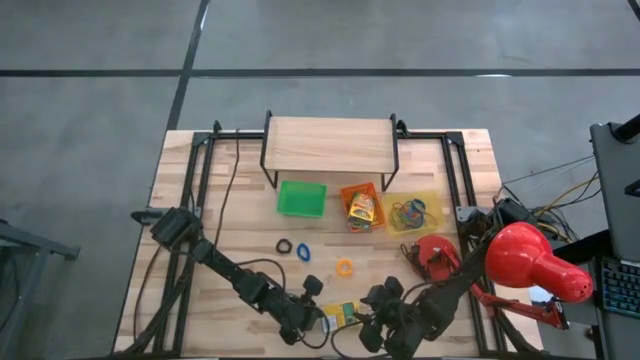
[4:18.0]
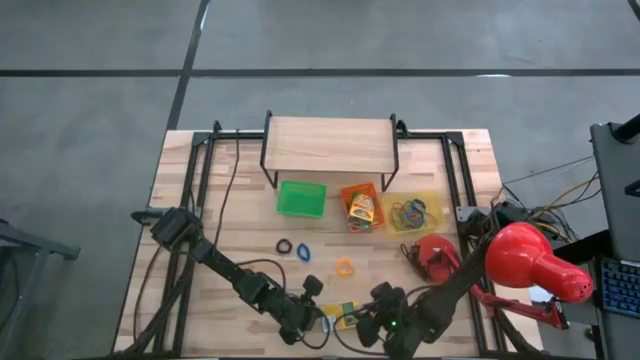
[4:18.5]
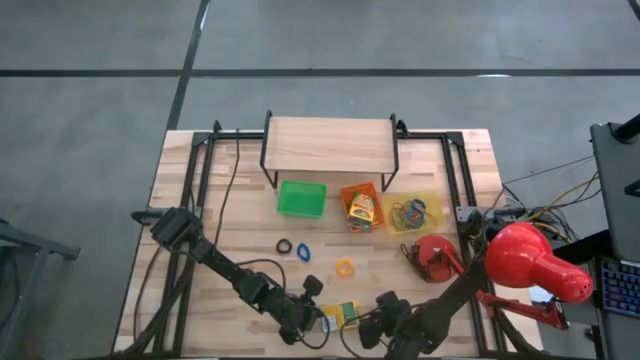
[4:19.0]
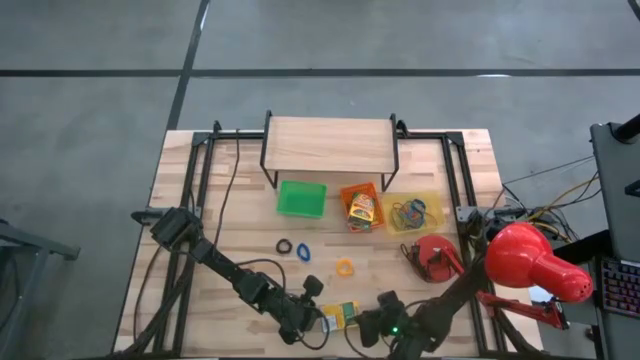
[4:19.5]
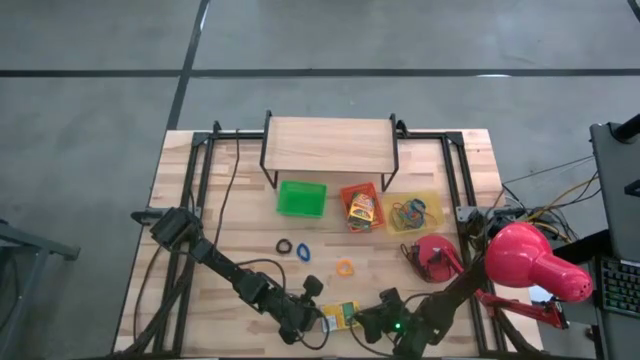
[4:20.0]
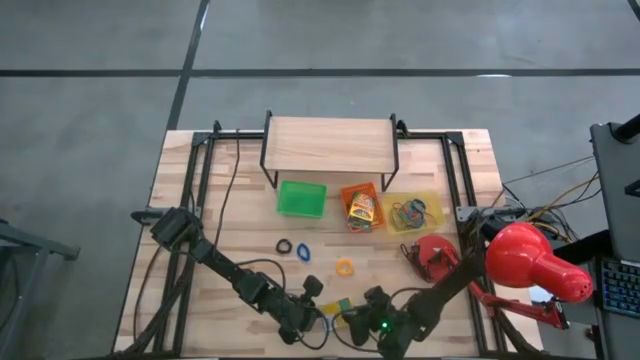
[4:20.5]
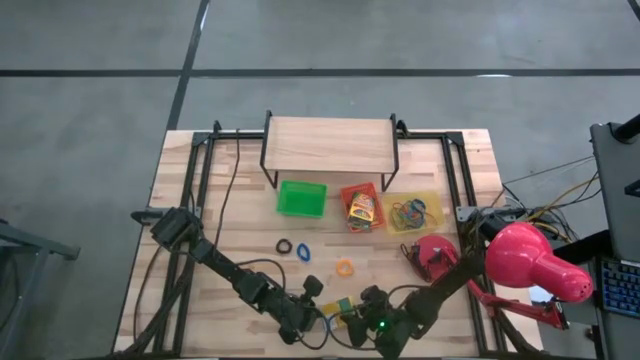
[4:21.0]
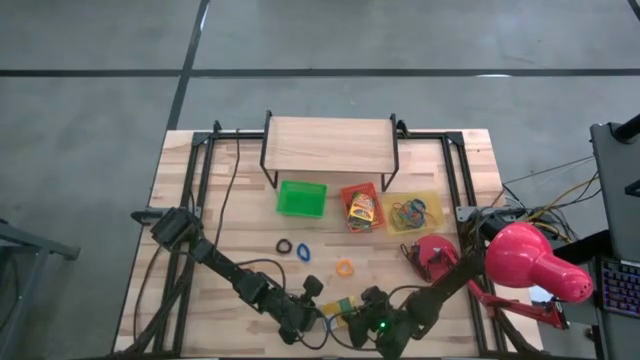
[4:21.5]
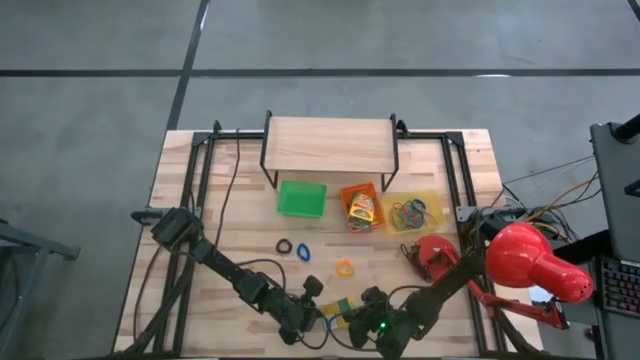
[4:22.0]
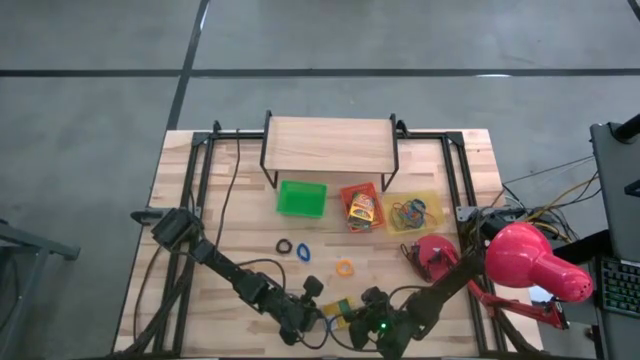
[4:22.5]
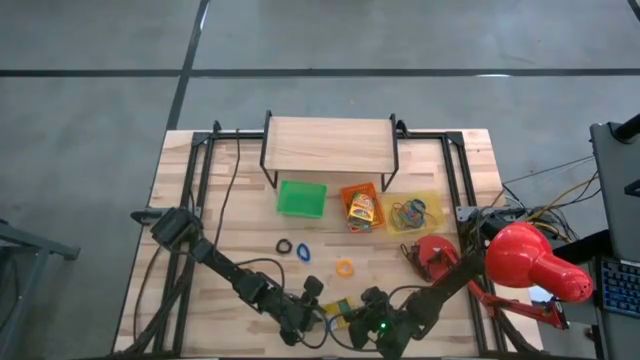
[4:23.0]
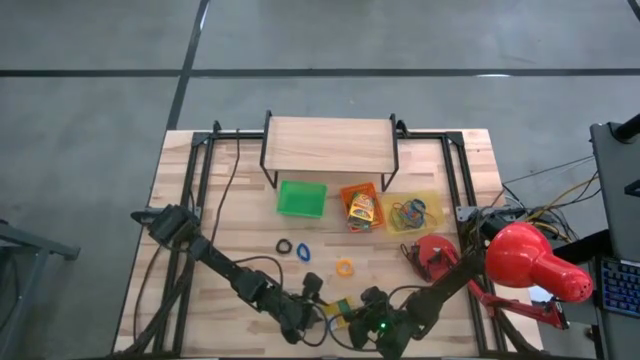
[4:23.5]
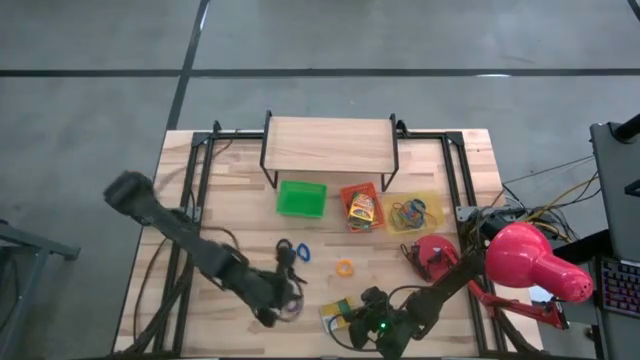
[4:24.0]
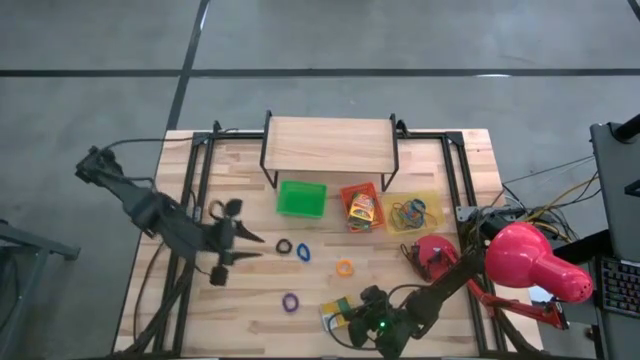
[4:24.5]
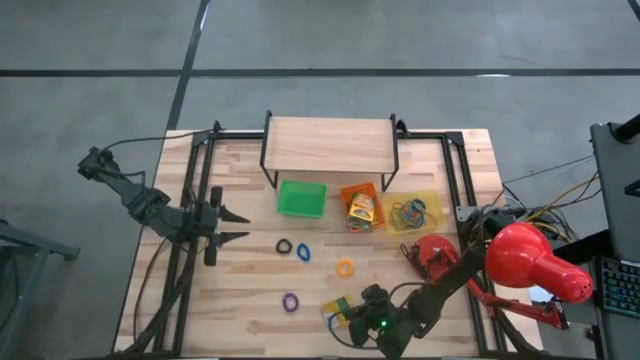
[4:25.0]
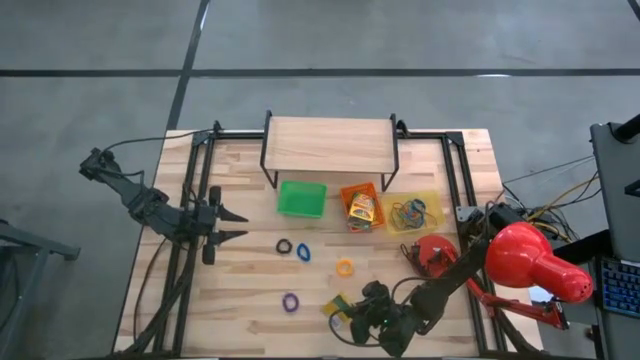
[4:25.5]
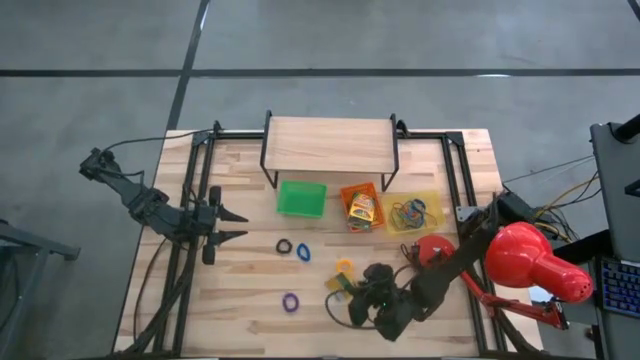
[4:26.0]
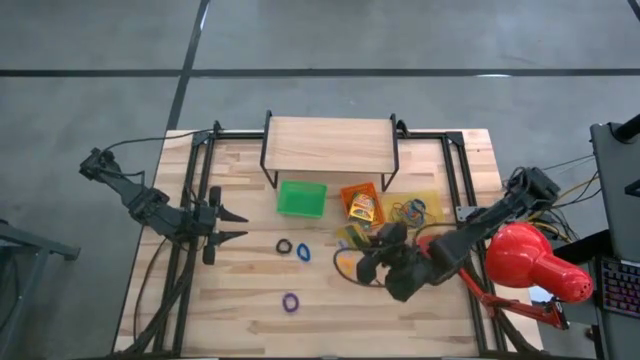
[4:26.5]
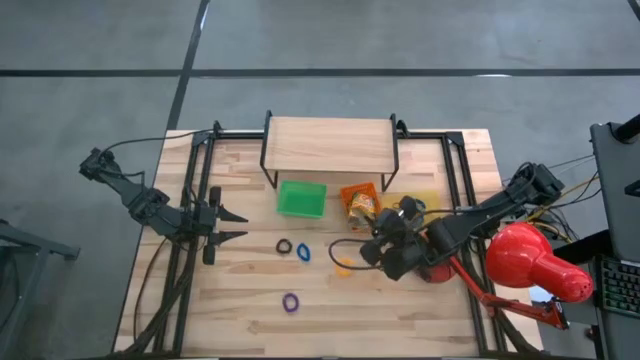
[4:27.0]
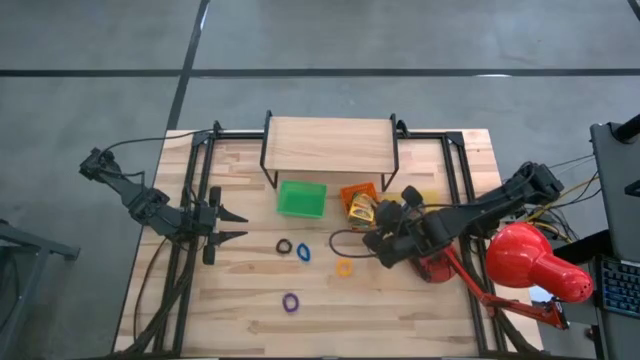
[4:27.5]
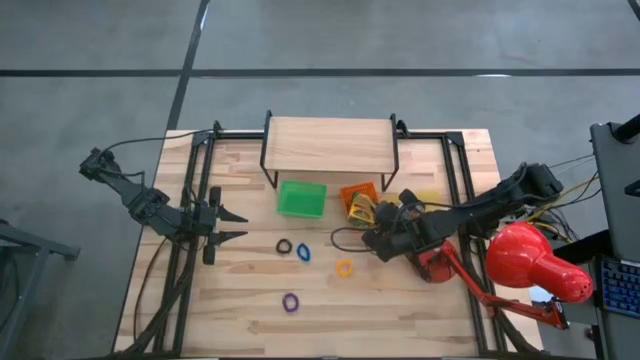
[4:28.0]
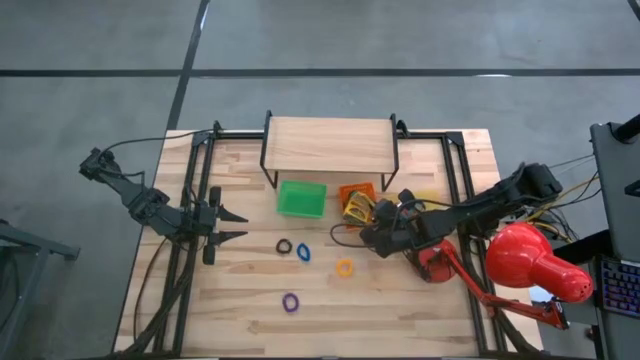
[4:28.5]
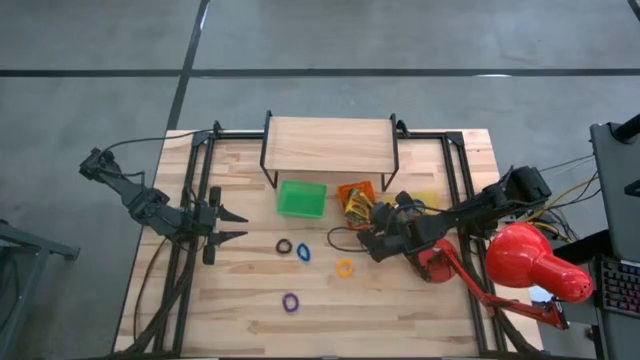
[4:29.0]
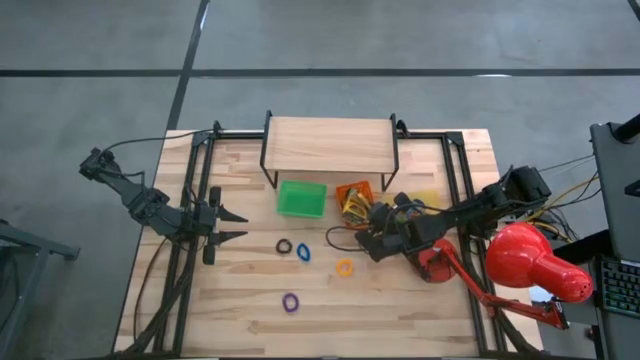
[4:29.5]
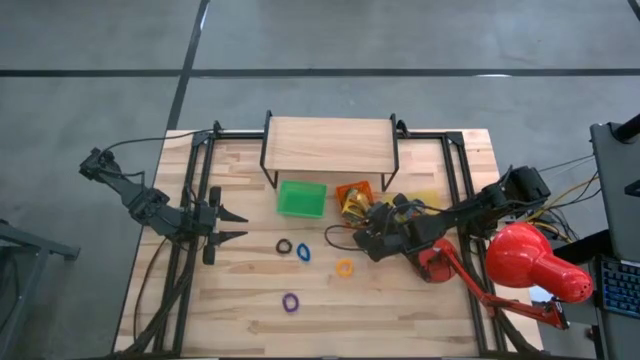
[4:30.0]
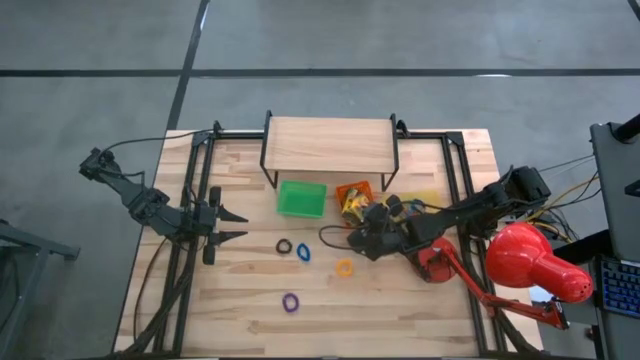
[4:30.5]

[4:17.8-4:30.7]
Task: Pick & Place Office Desk Supplies
Put the large crayon box into the orange bin

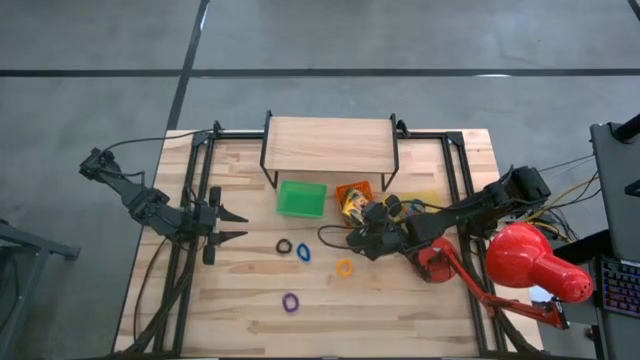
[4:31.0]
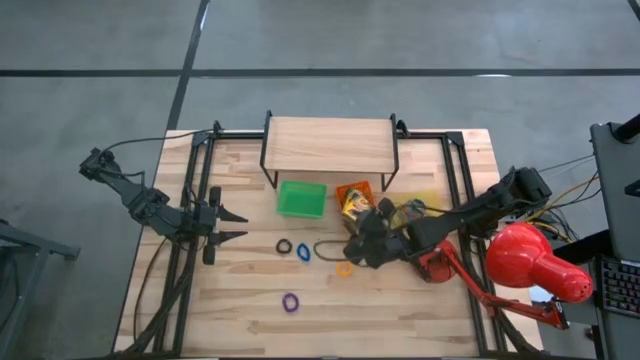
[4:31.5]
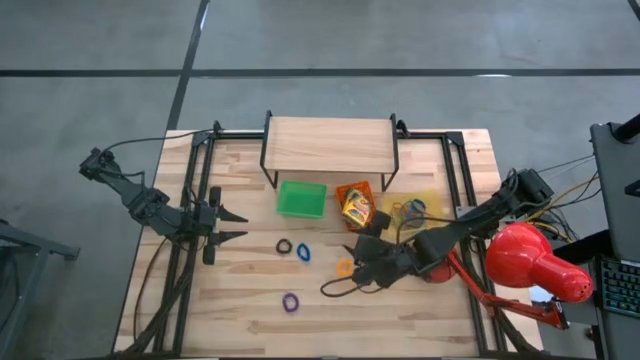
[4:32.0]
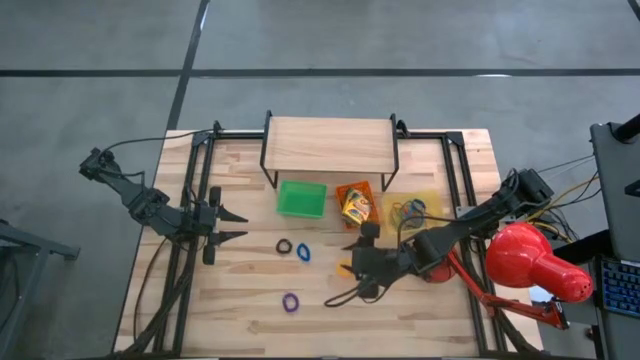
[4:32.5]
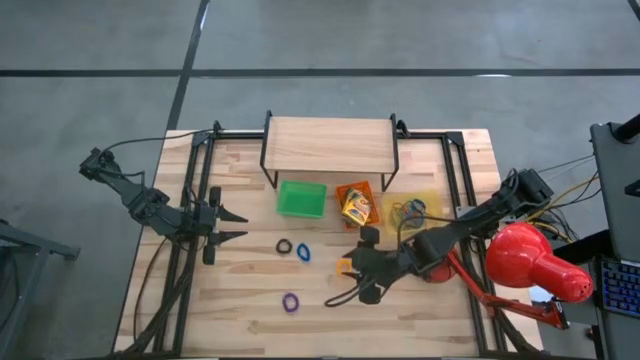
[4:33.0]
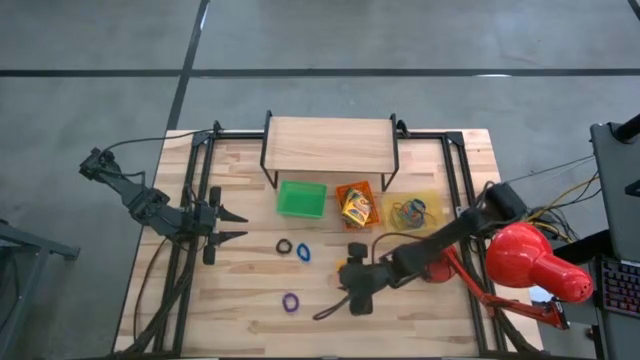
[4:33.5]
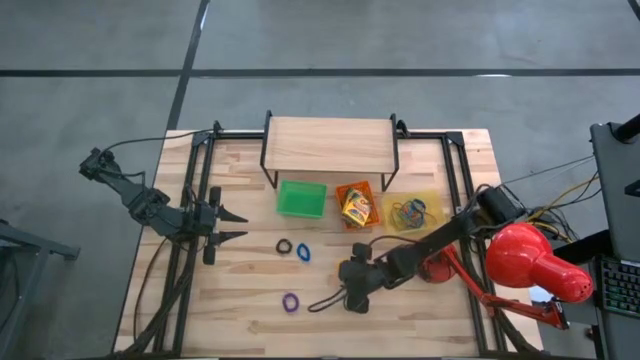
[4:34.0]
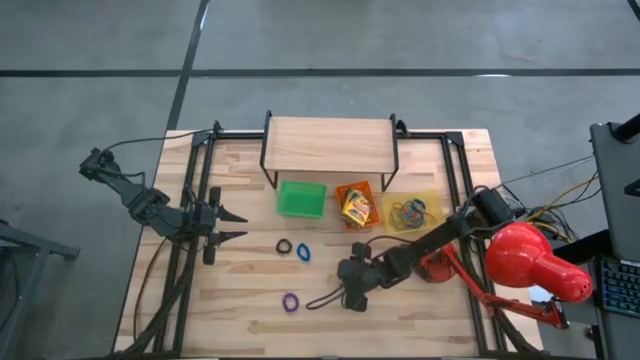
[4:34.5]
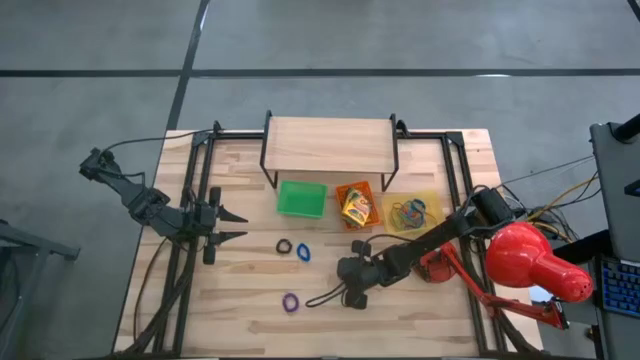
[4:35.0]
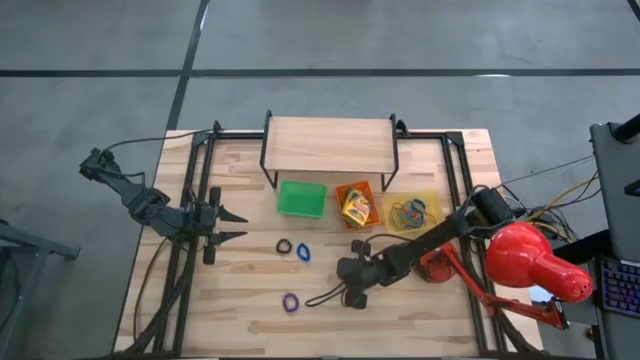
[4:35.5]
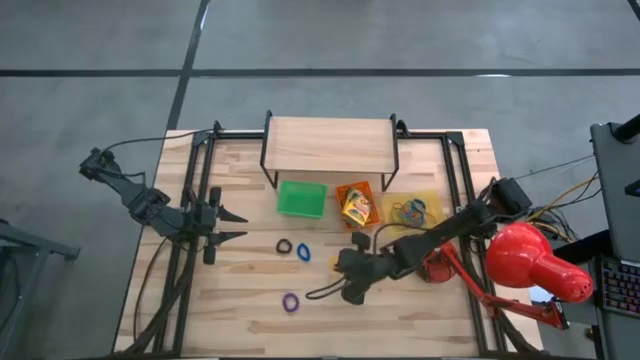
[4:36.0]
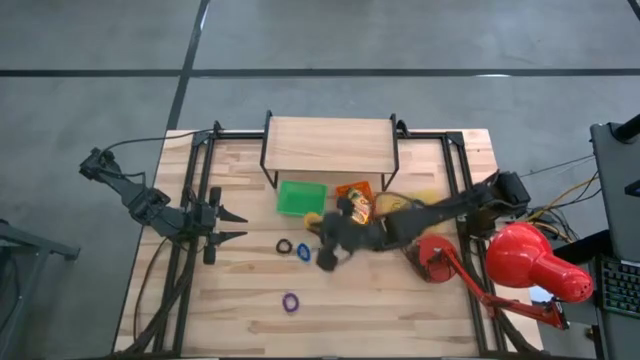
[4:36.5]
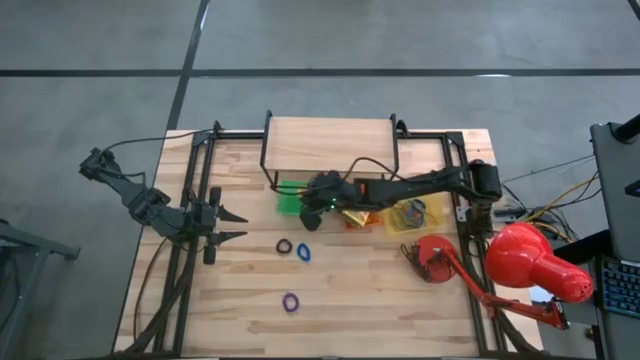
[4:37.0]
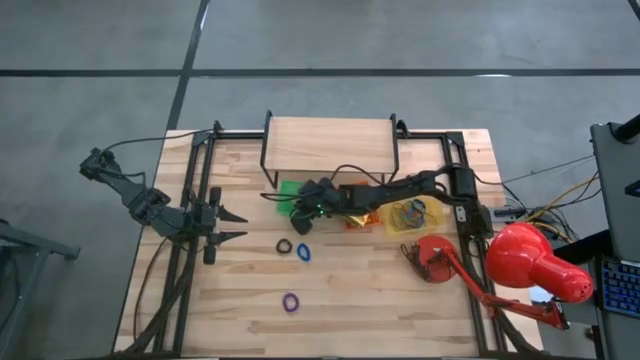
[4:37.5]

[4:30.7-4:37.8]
Put the yellow spring rubber band into the green bin

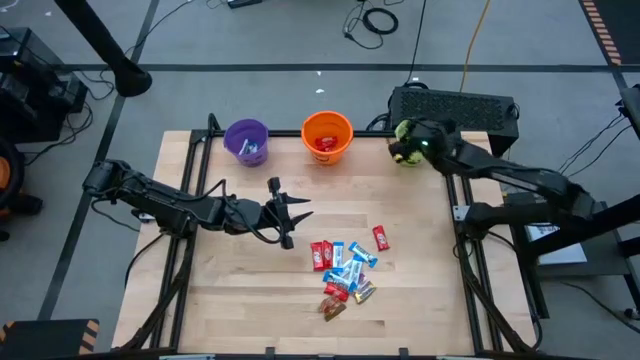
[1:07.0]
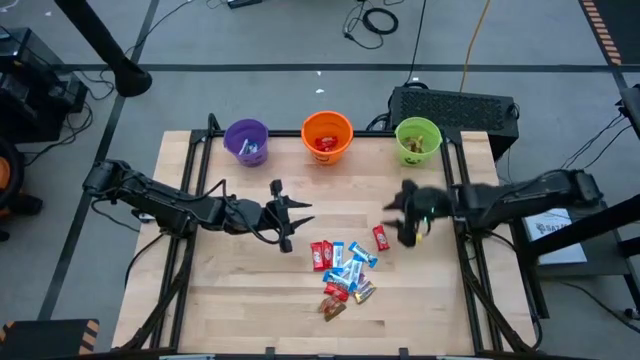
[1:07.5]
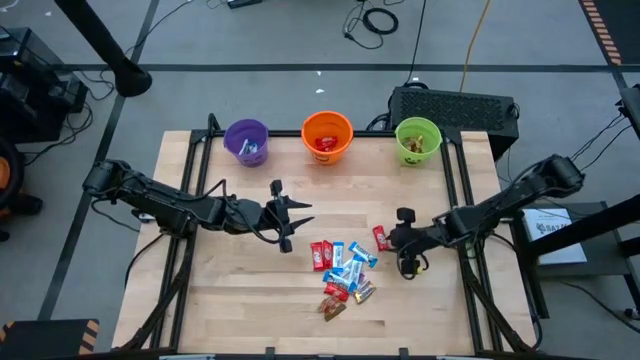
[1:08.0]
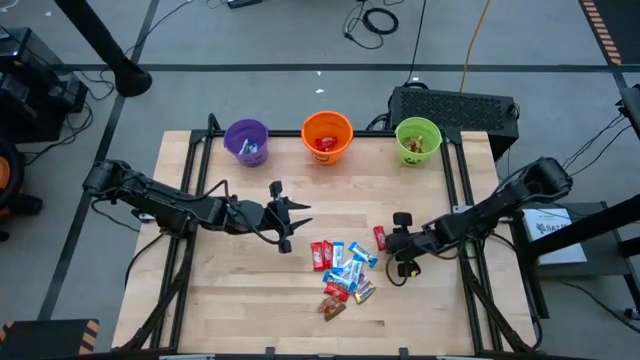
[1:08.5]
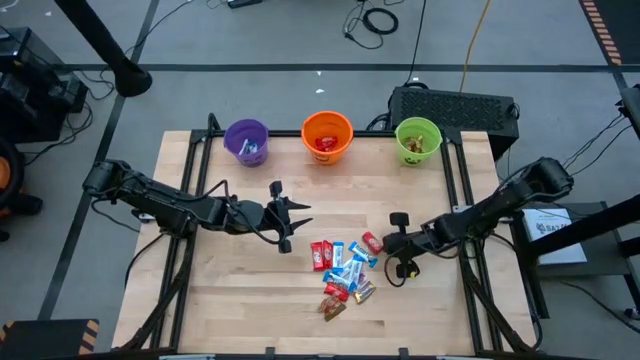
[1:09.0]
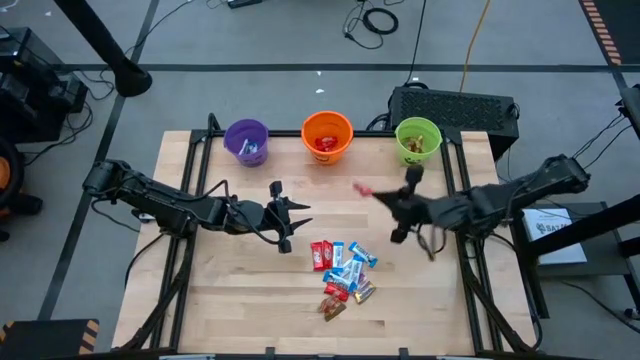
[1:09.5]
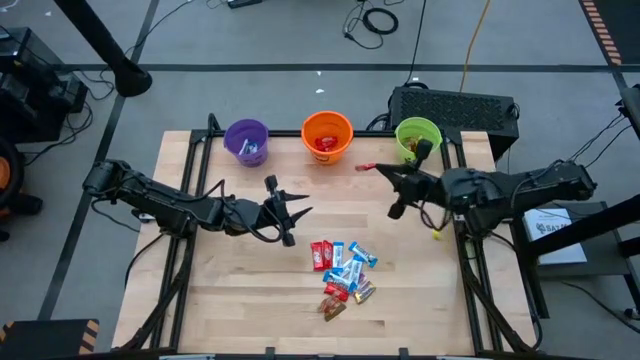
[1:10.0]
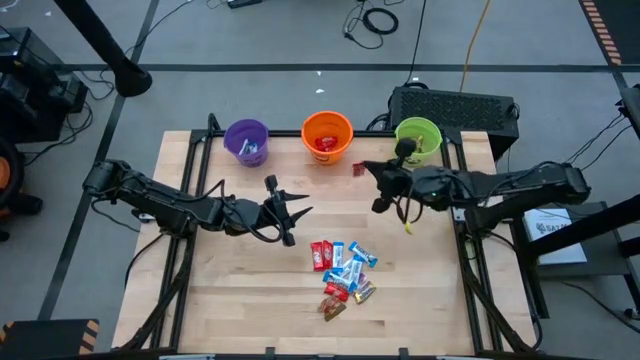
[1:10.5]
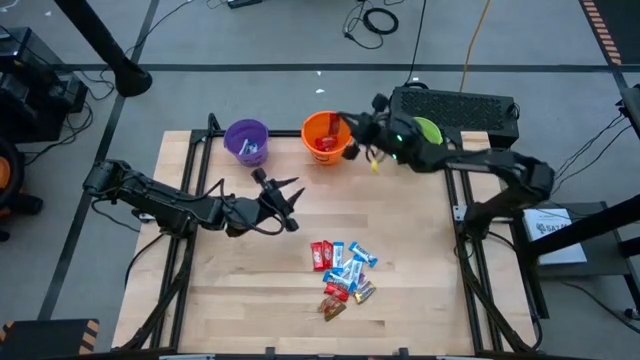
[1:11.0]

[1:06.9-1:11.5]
Task: Sort candy by brand, put in halloween buckets
Put the red chocolate into the orange bucket
